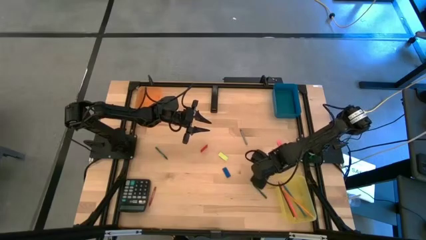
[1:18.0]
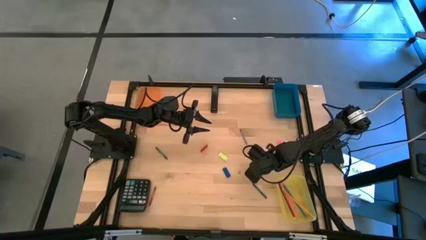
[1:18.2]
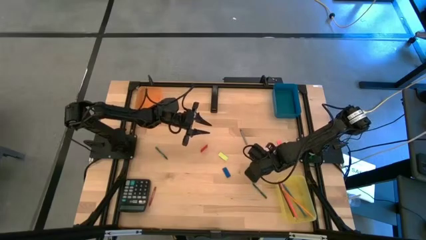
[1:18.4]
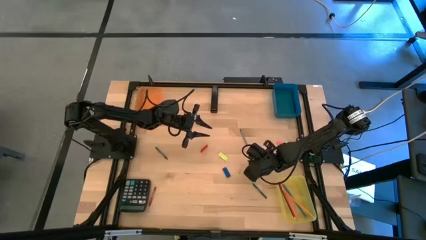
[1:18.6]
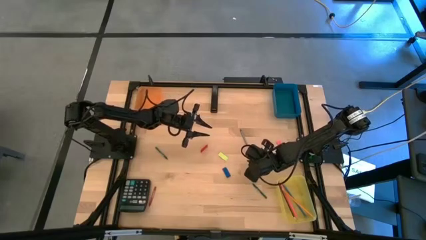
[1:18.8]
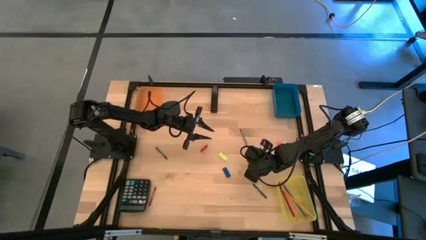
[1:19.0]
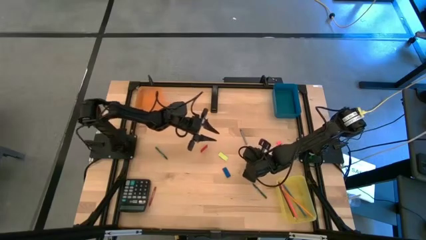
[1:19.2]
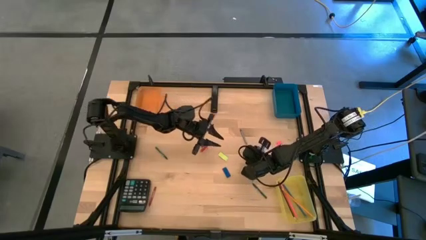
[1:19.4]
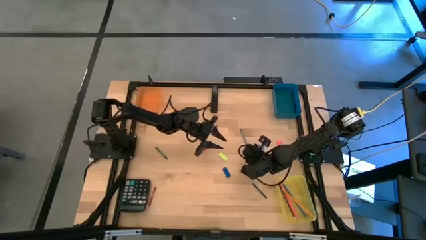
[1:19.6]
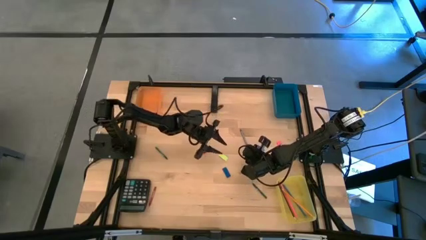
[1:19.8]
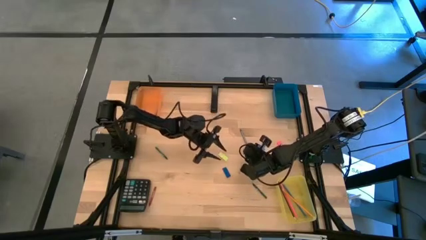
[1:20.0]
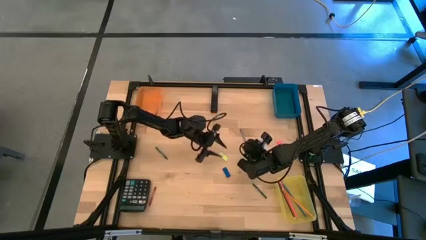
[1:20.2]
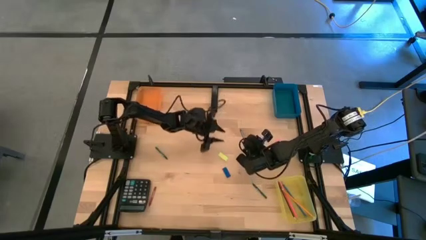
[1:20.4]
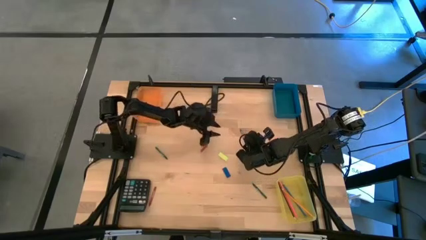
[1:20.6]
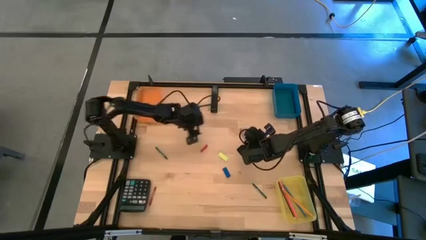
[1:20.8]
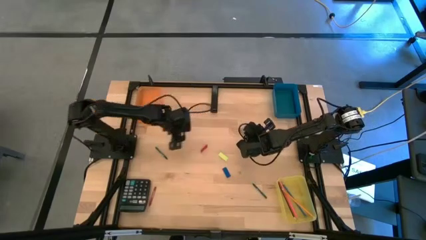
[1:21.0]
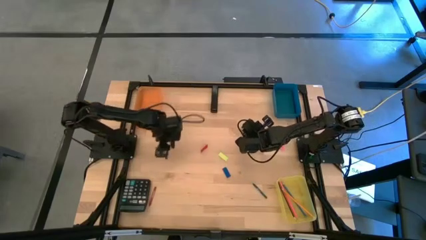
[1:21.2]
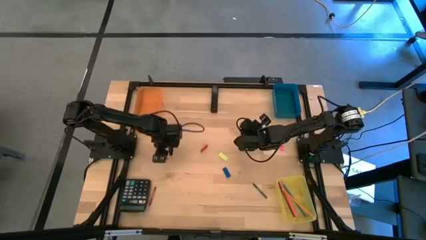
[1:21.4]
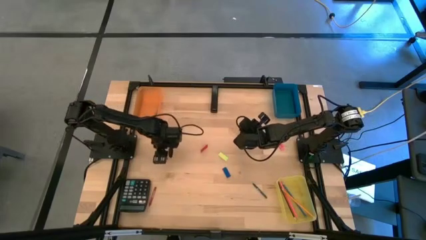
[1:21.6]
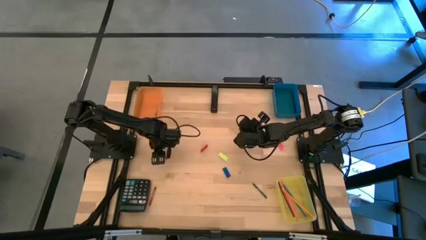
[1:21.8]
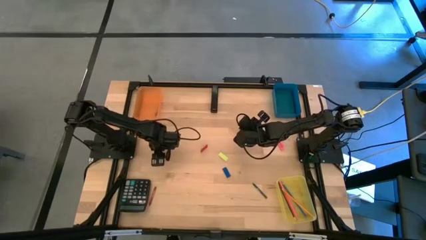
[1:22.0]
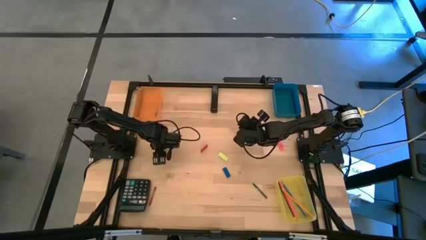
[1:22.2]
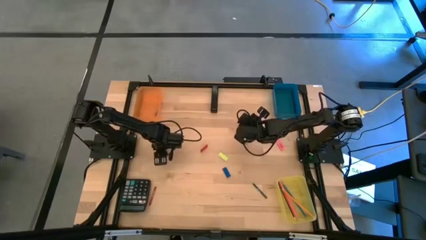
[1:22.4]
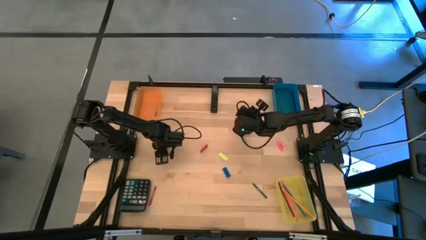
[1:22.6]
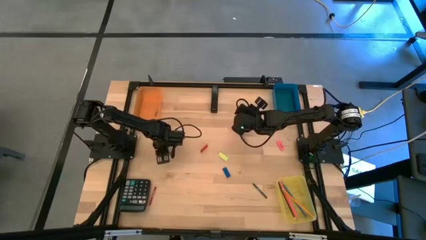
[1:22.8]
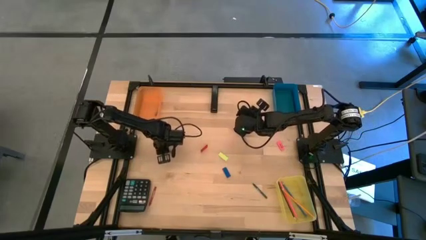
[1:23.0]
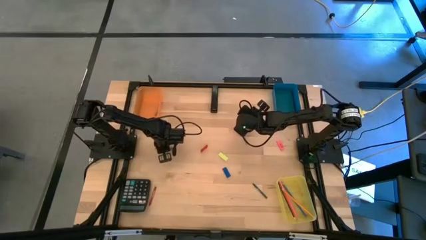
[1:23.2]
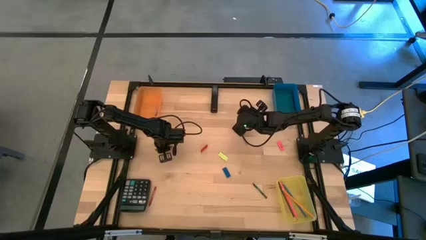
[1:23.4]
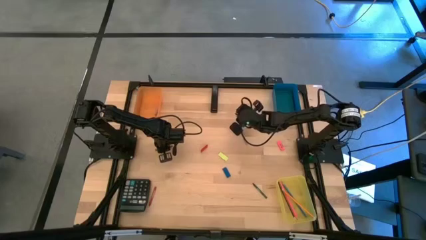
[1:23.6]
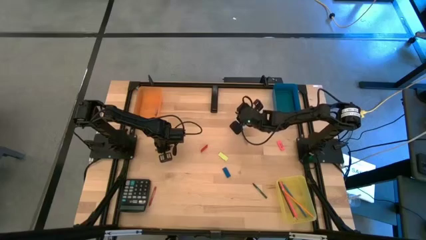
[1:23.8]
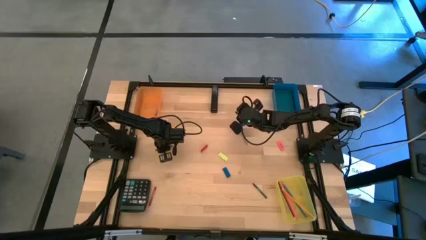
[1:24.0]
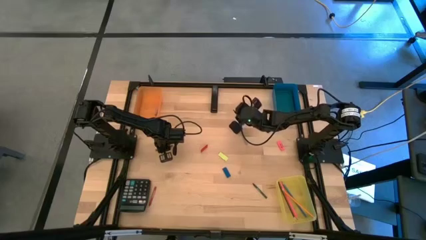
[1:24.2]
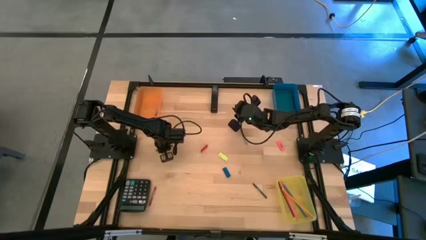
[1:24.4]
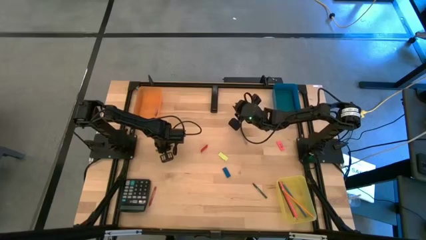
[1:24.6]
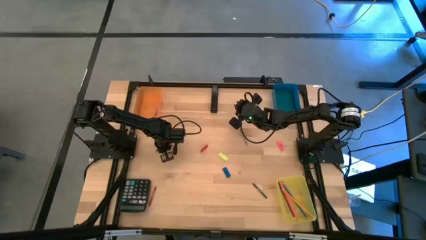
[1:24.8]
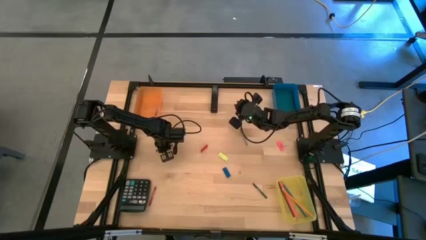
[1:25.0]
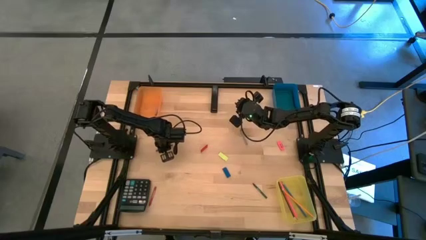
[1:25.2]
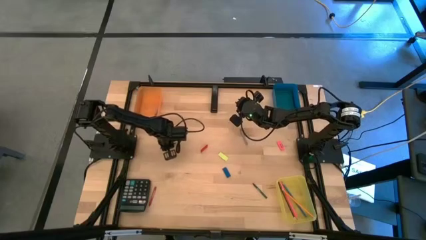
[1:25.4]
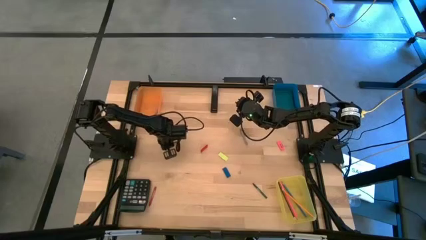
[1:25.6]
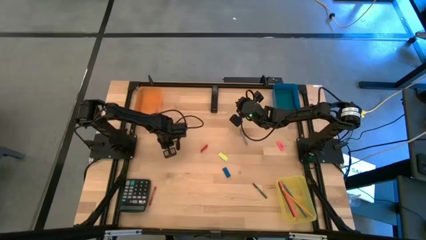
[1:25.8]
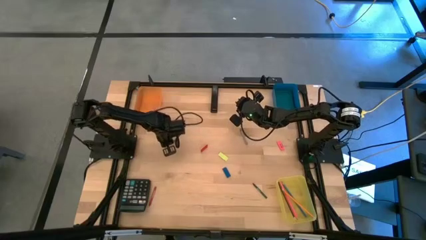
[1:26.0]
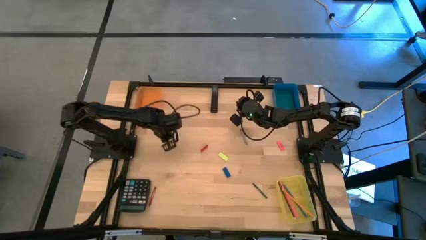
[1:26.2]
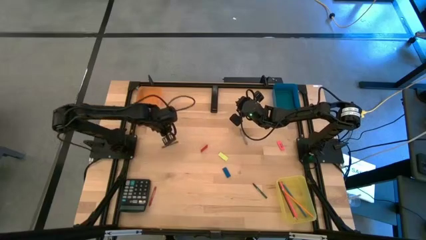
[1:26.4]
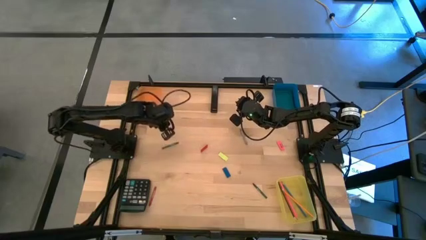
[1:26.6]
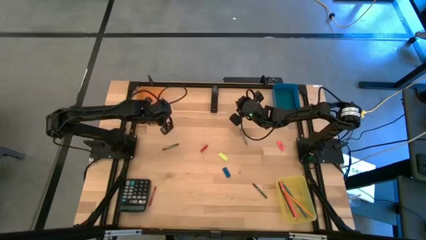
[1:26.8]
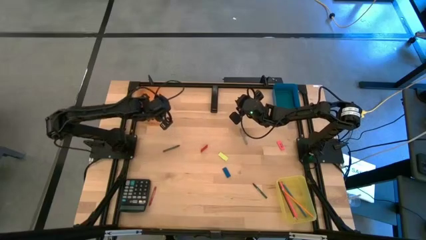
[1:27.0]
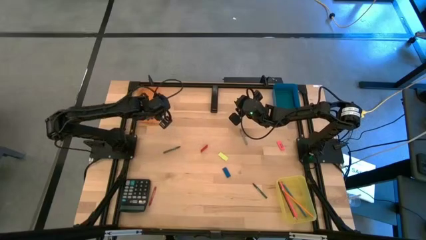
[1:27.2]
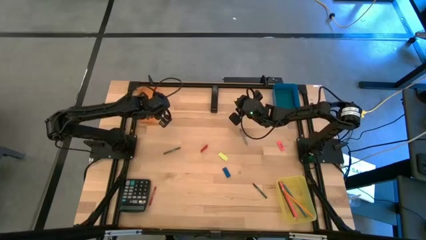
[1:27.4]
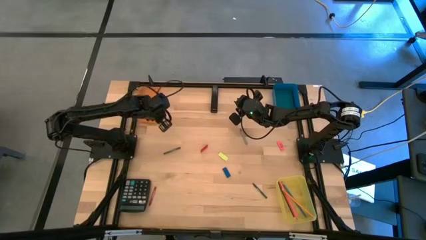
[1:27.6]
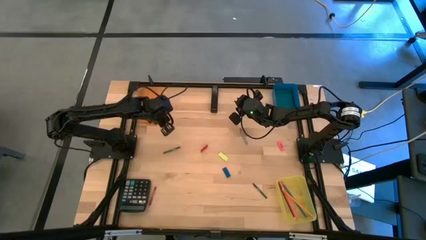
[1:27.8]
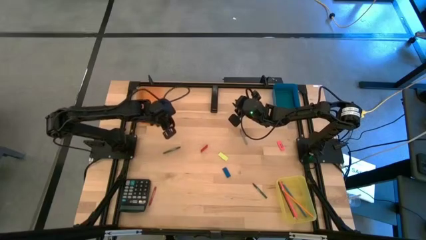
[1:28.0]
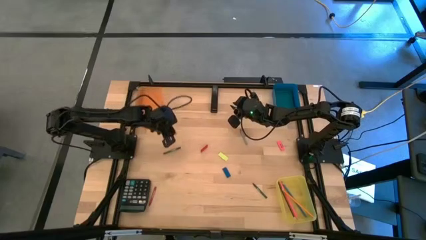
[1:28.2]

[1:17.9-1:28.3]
Task: Sort crayons/erasers/pens/pencils in bins
Put the top green crayon into the orange bin

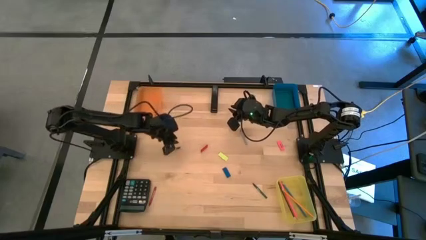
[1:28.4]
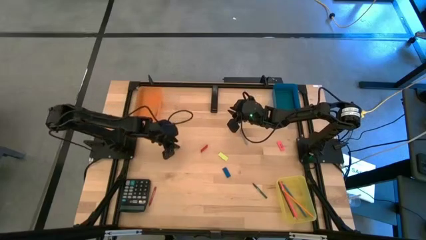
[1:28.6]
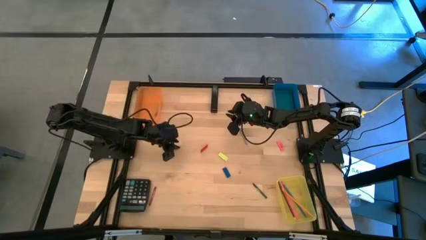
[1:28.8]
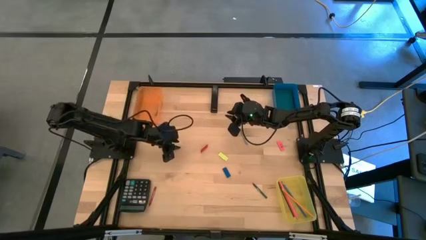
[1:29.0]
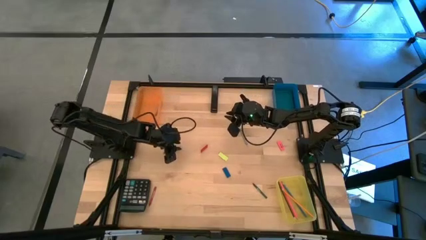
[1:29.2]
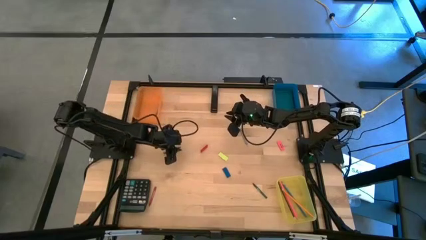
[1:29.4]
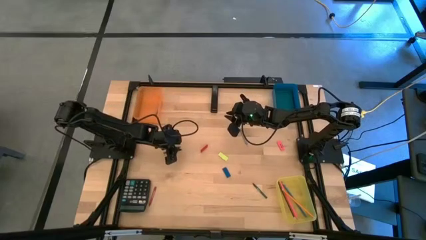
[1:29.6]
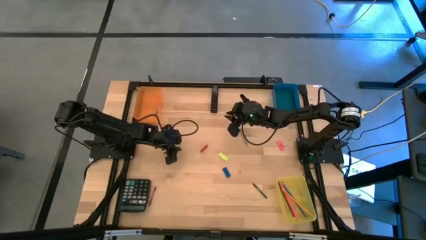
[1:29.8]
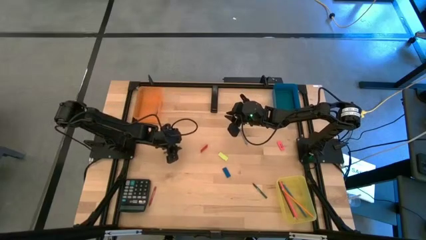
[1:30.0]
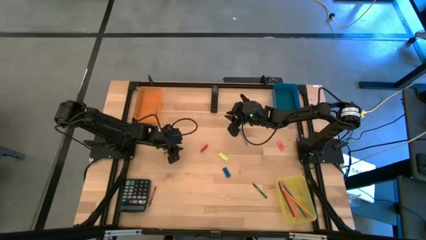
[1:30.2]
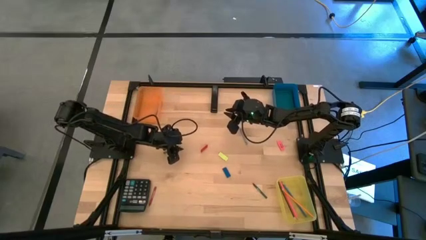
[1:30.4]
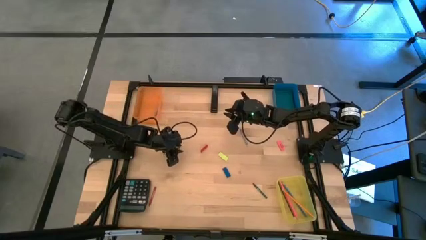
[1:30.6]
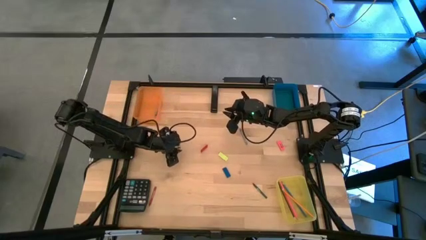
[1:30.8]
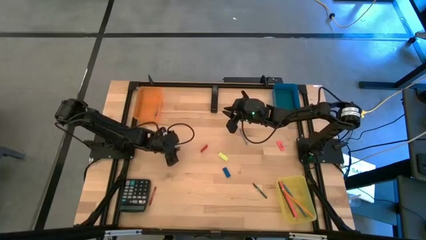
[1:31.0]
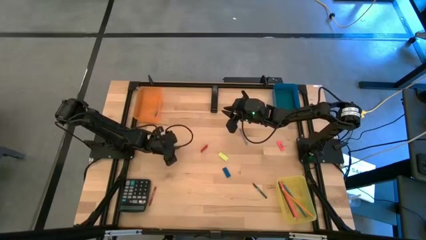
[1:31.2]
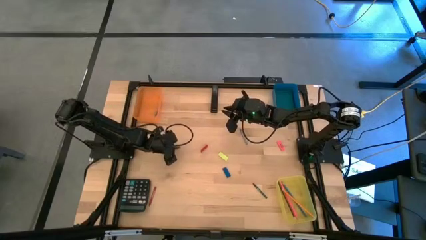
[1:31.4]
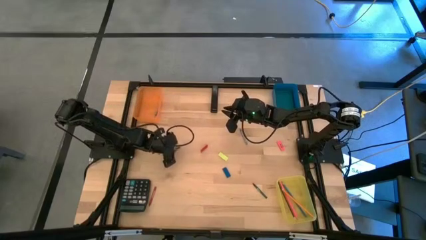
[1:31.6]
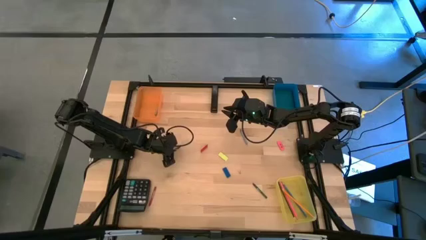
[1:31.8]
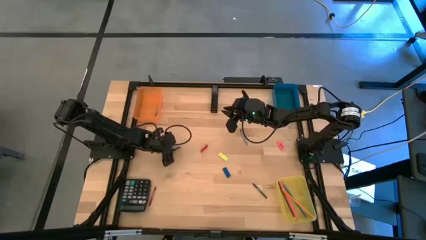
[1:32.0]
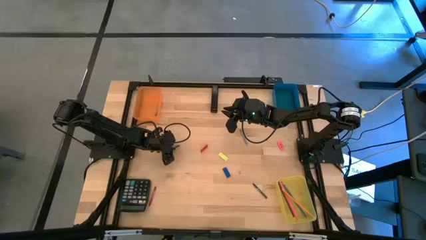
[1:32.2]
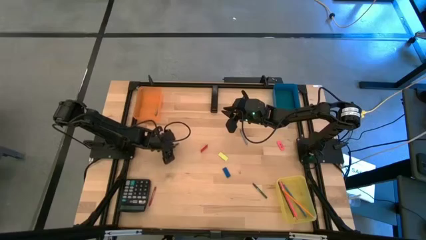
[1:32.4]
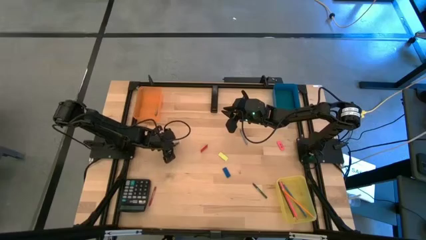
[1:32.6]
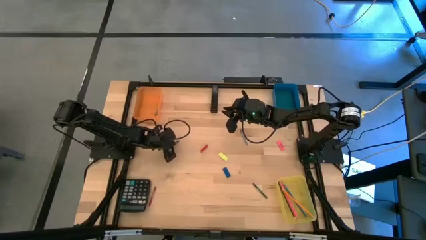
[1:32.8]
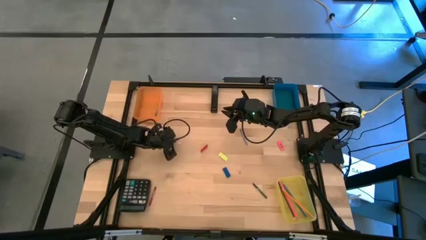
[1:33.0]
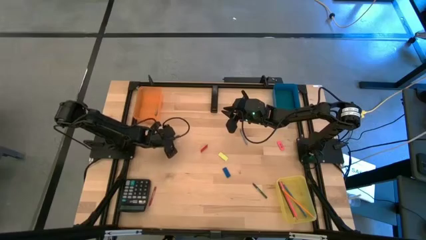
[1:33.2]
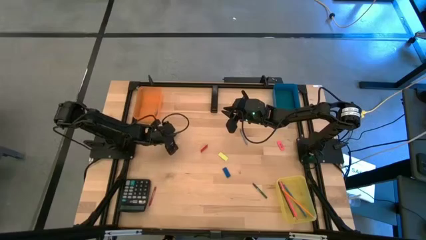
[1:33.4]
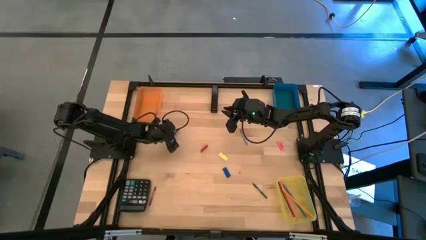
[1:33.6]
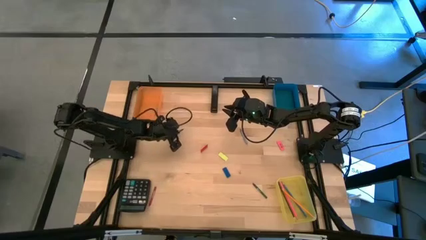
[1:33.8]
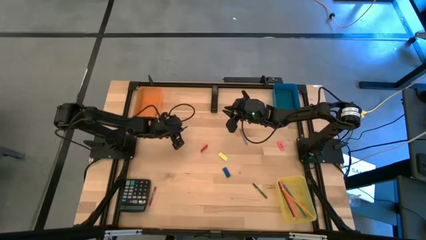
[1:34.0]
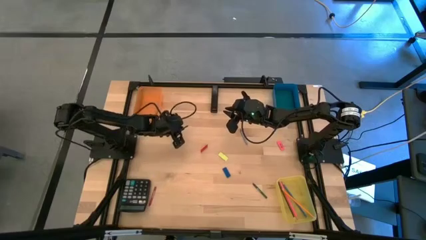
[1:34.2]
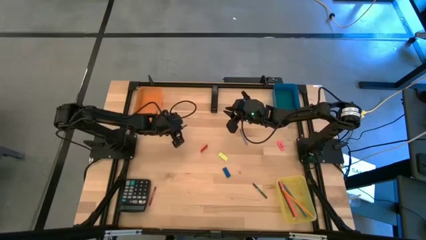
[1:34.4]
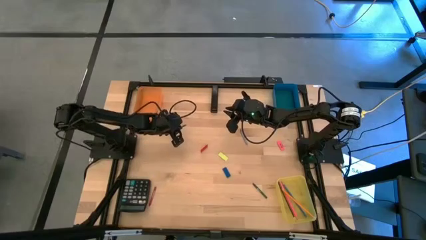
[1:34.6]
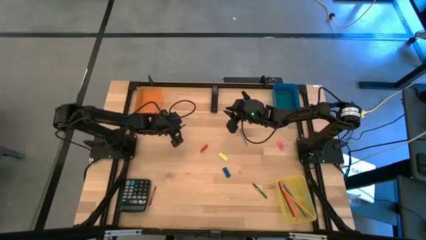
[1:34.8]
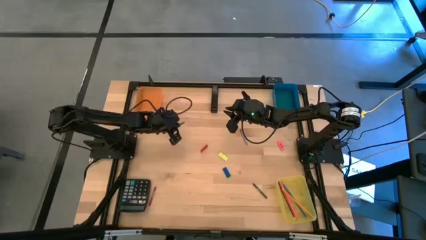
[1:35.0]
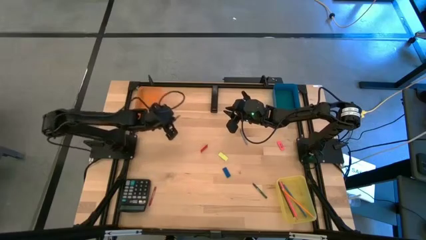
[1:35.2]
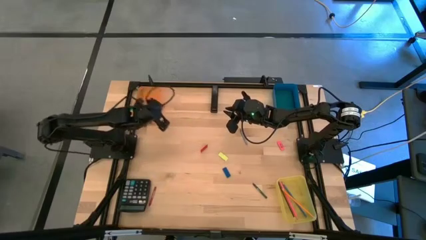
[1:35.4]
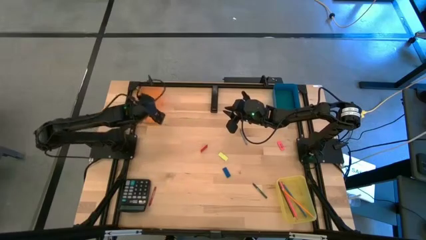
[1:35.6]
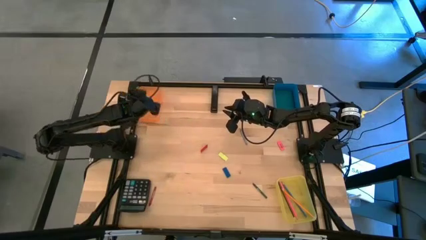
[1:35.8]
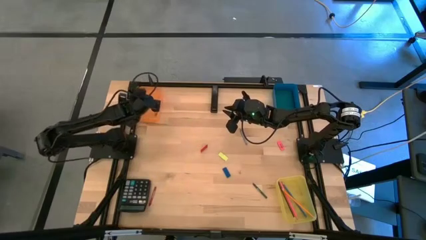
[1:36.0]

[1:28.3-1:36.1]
Put the top green crayon into the orange bin
